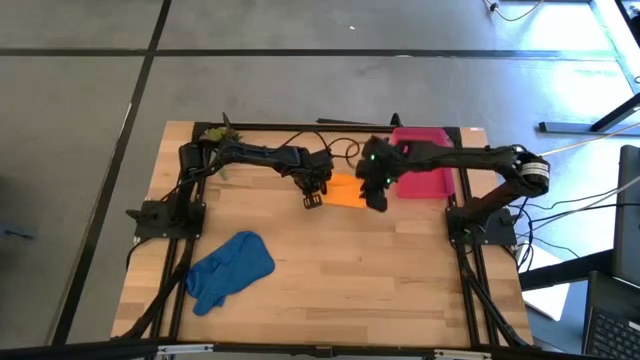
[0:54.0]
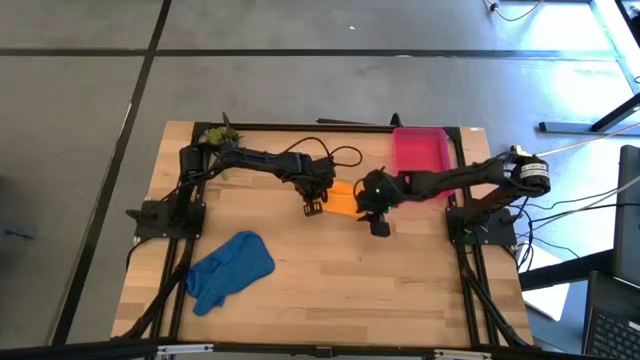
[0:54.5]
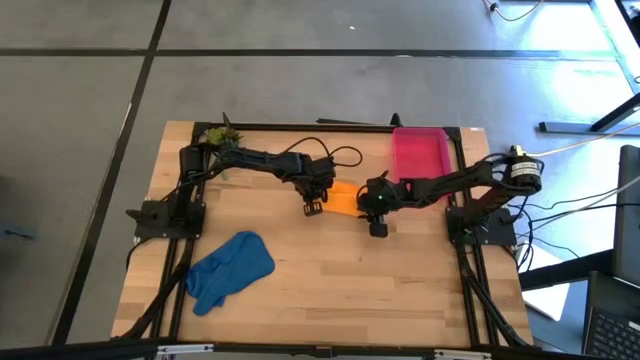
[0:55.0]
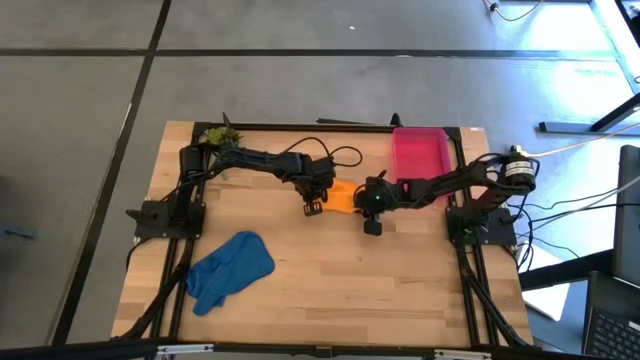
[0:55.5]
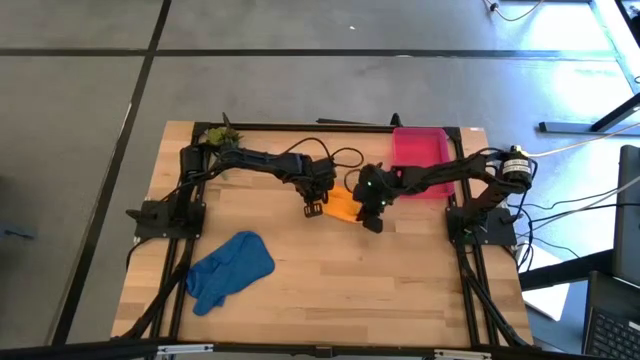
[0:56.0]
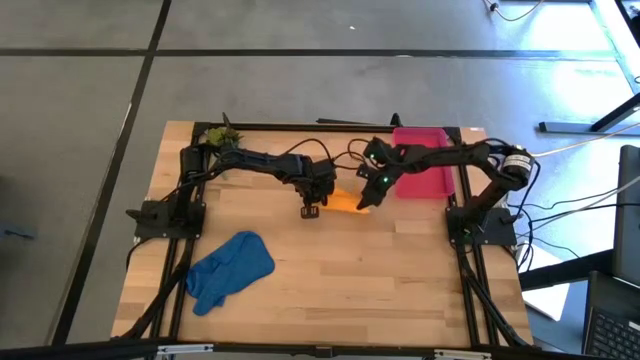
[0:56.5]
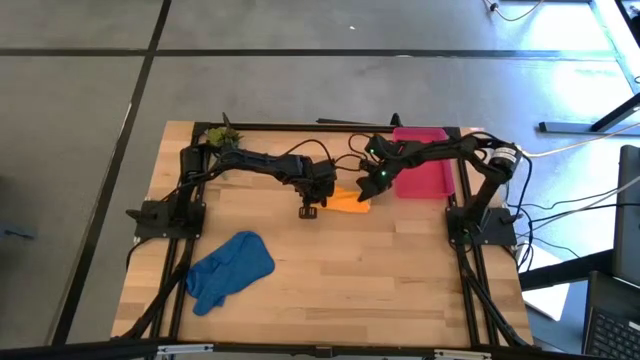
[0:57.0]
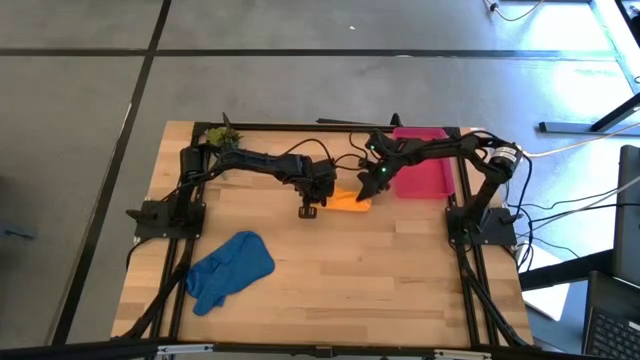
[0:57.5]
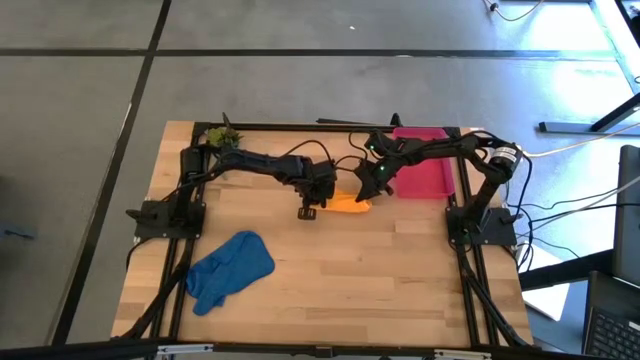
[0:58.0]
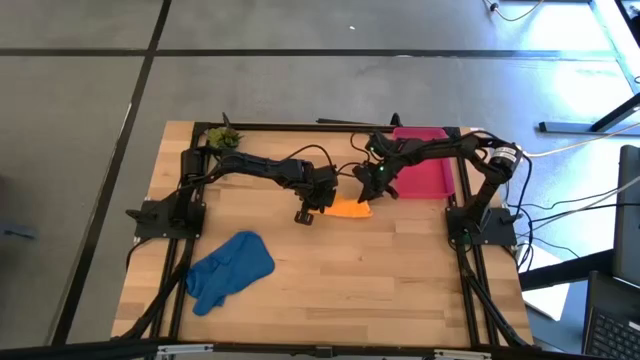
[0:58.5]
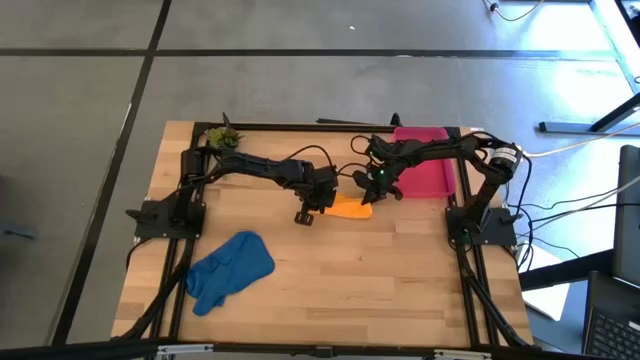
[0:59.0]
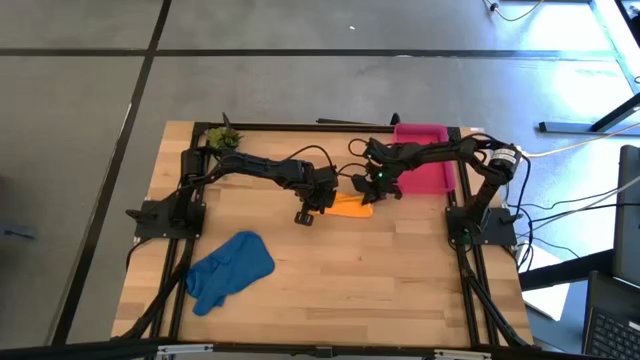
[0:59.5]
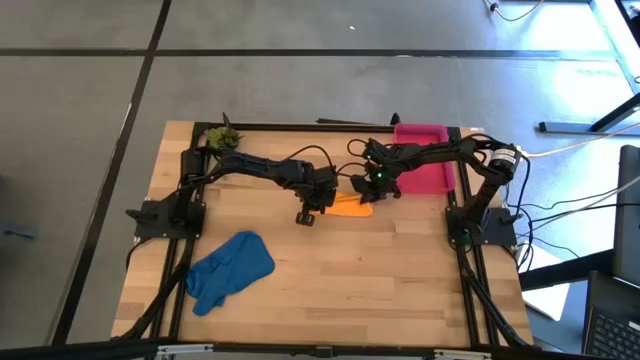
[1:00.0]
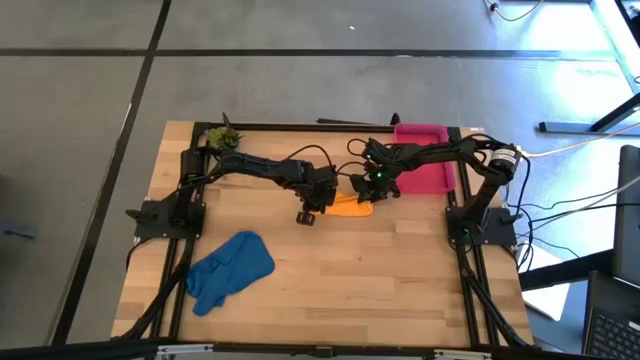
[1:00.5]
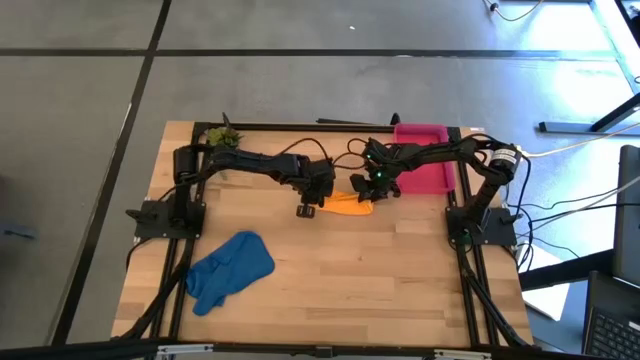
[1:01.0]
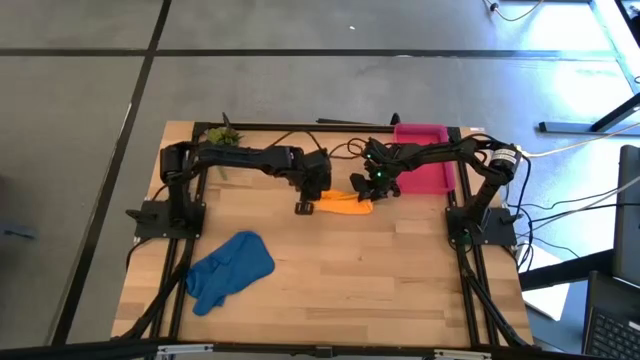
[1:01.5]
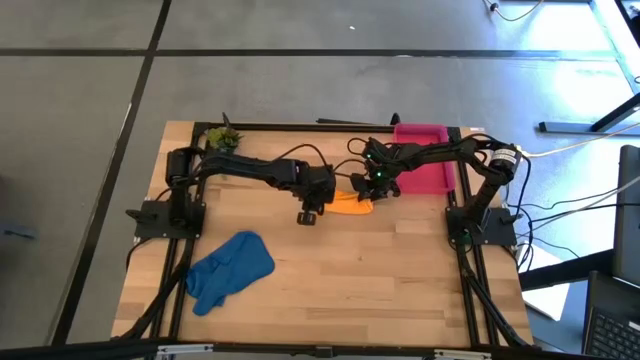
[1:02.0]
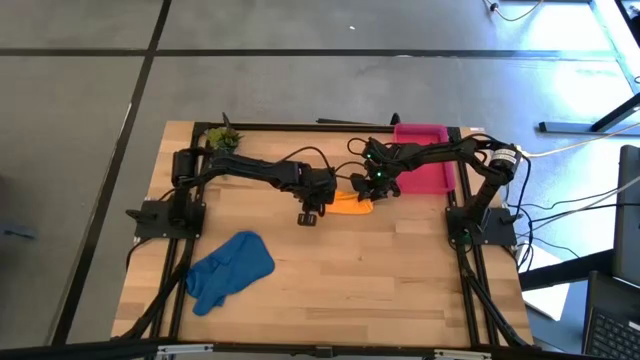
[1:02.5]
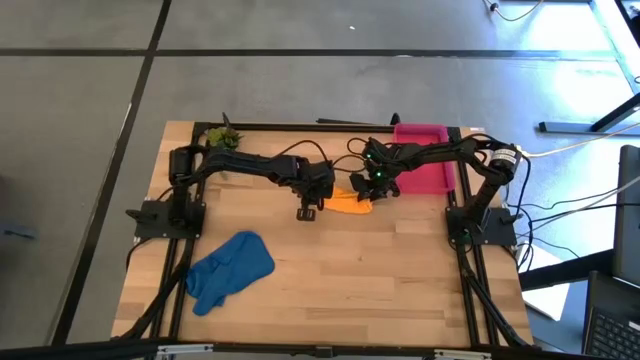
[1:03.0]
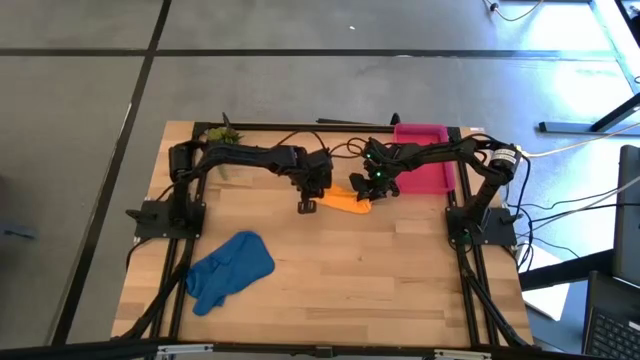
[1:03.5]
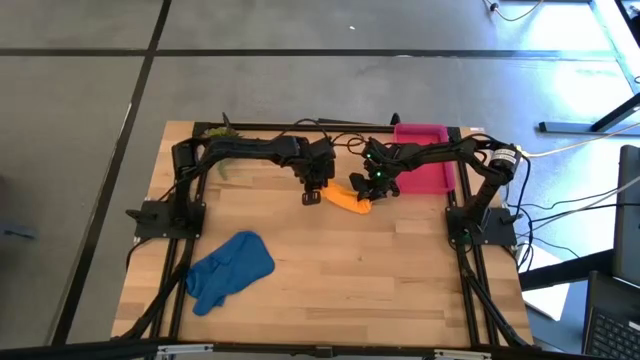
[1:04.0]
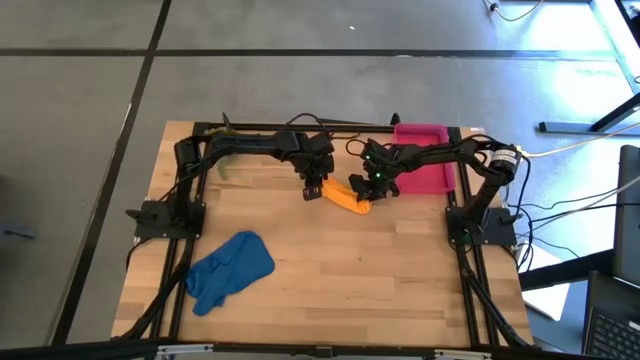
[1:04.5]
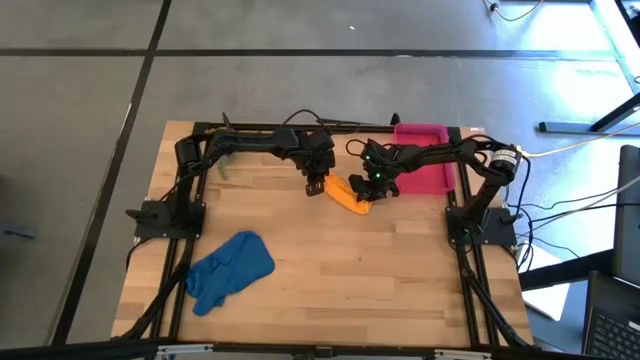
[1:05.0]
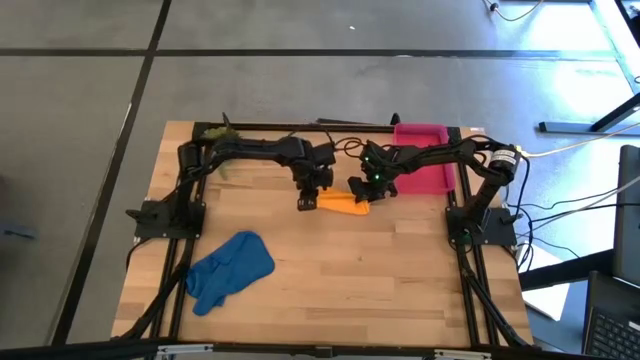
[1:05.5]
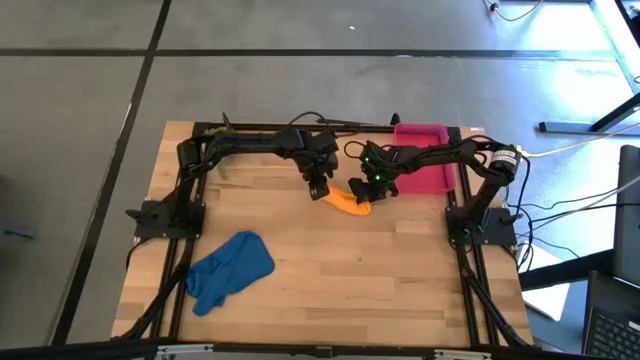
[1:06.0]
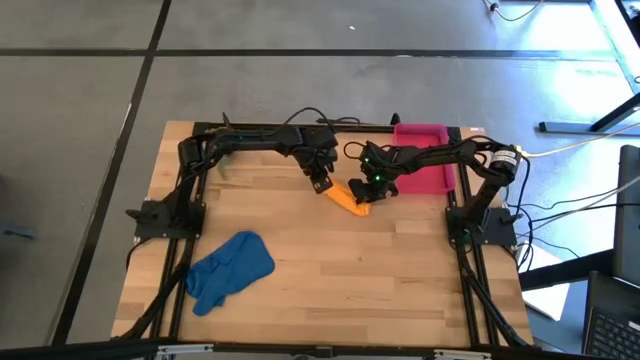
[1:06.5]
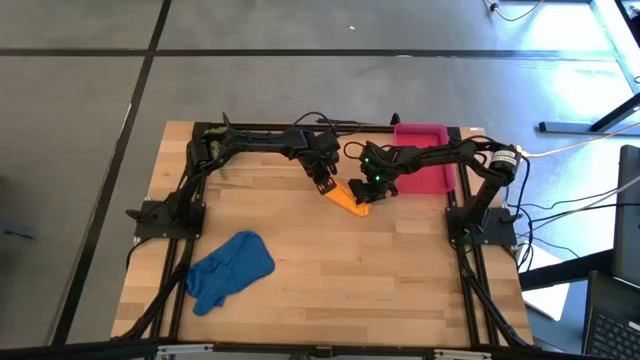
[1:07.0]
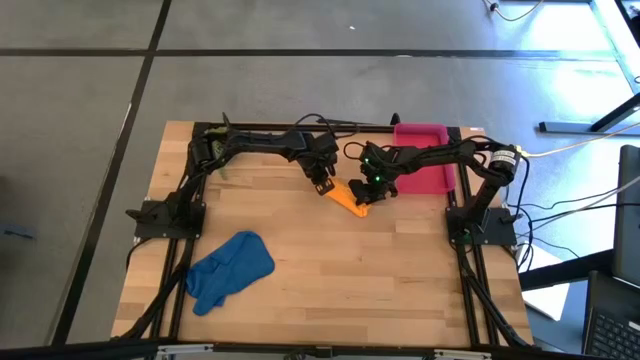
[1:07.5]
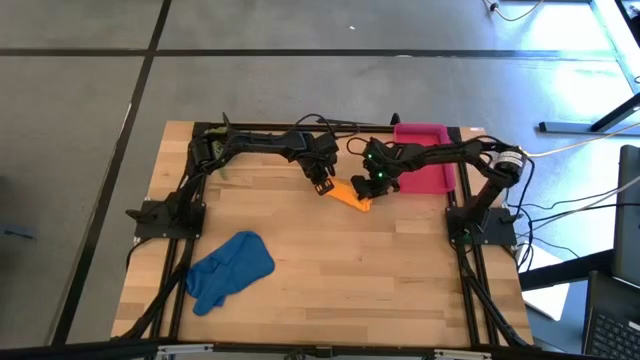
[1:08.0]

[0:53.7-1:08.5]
Task: Roll microfiber towels into tight, uniform cylinder then place into a basket
Roll the orange microfiber towel

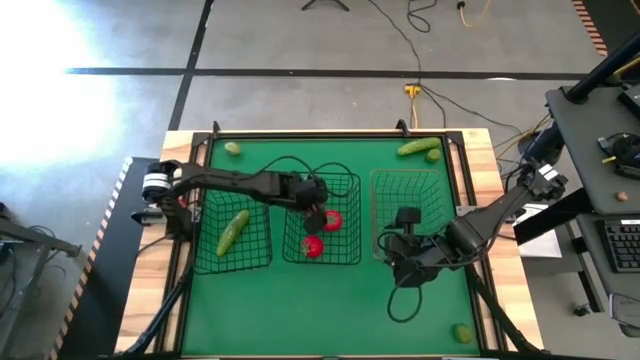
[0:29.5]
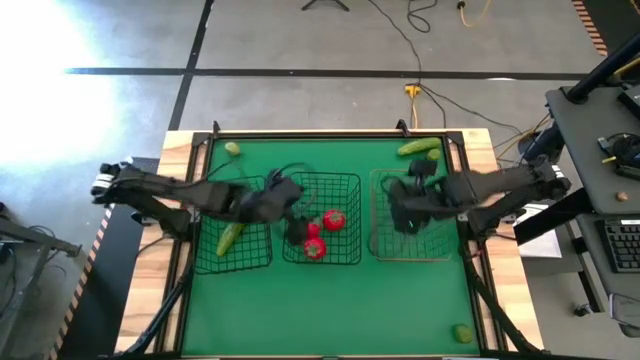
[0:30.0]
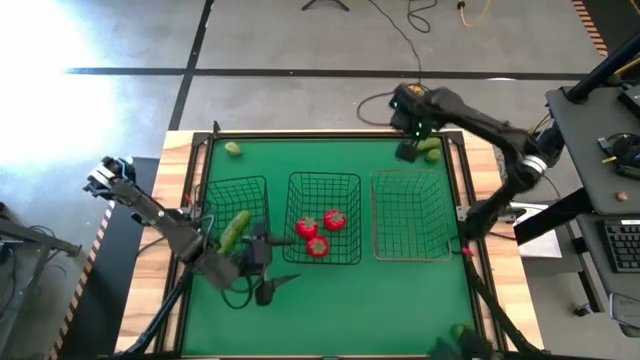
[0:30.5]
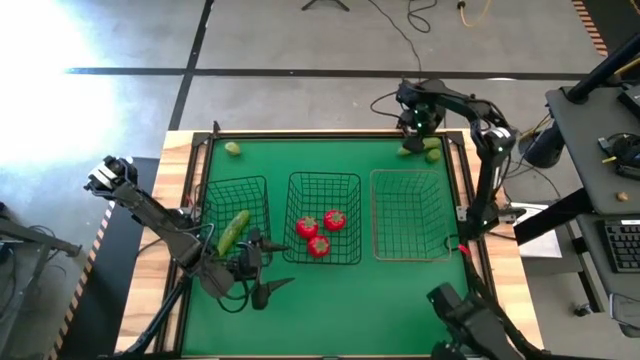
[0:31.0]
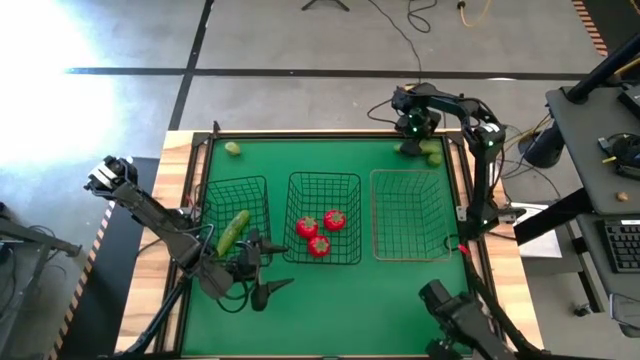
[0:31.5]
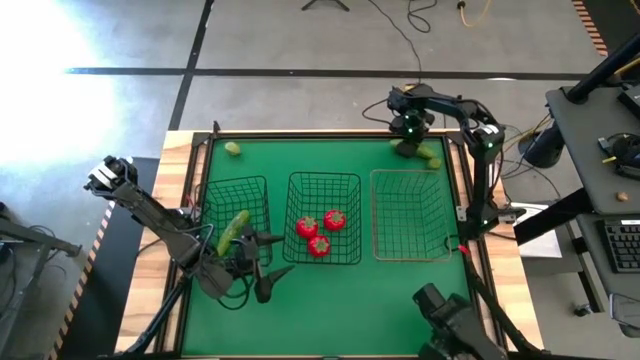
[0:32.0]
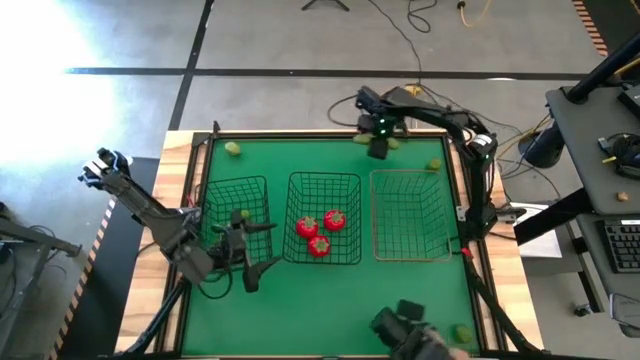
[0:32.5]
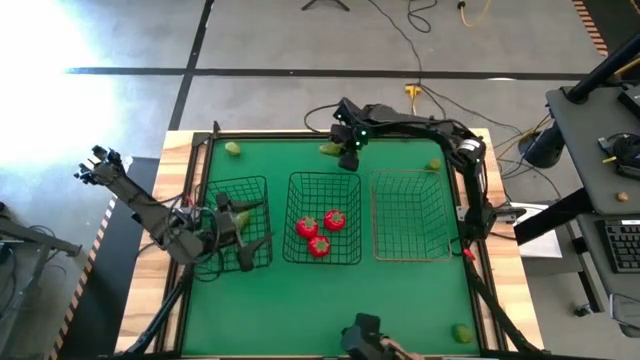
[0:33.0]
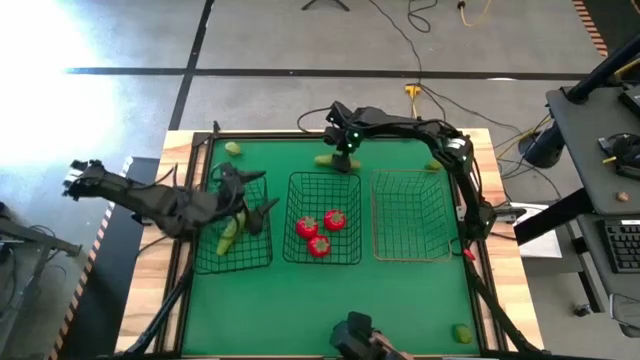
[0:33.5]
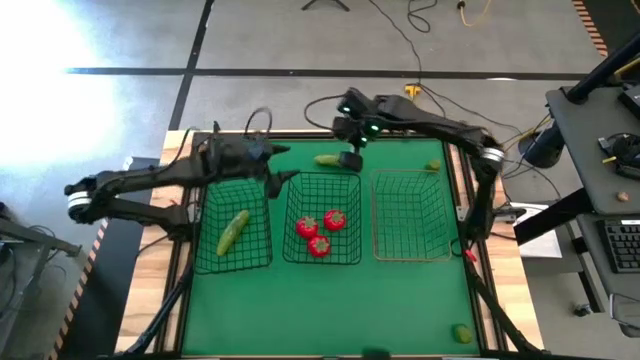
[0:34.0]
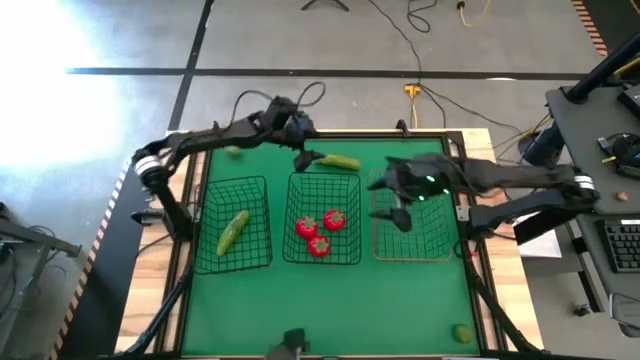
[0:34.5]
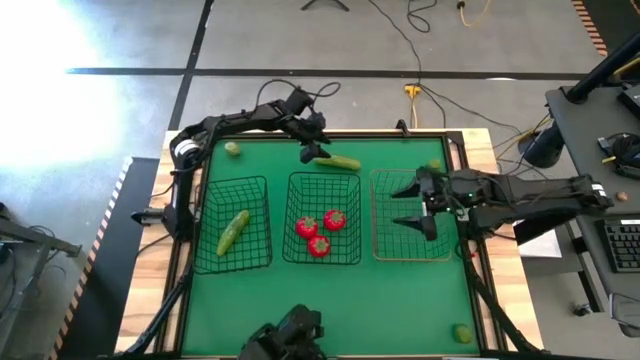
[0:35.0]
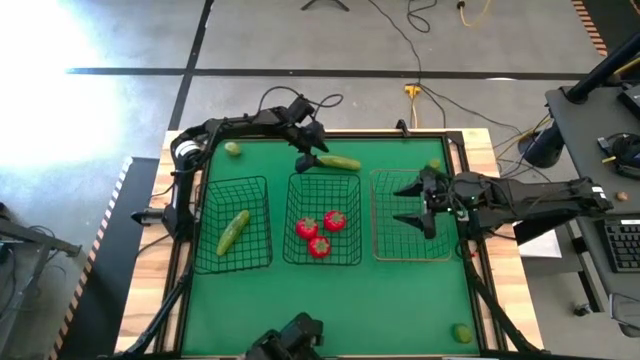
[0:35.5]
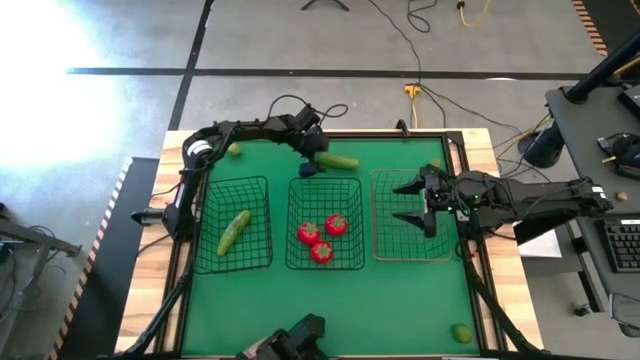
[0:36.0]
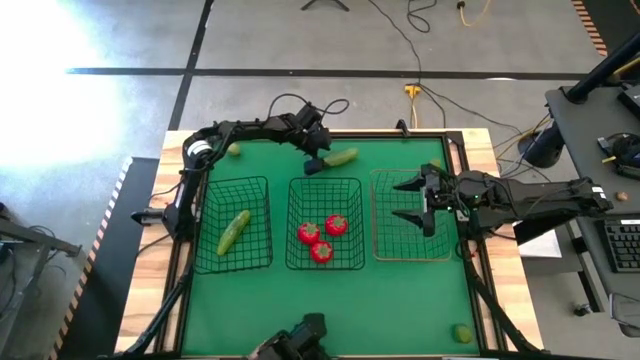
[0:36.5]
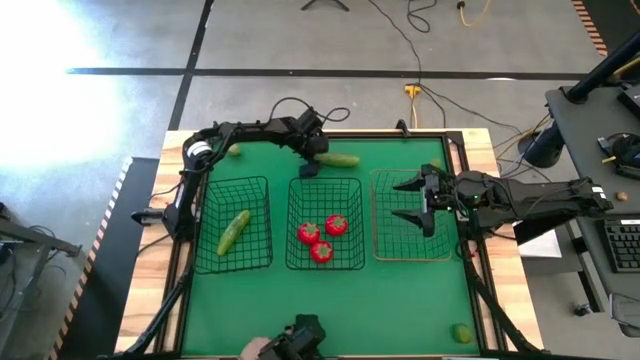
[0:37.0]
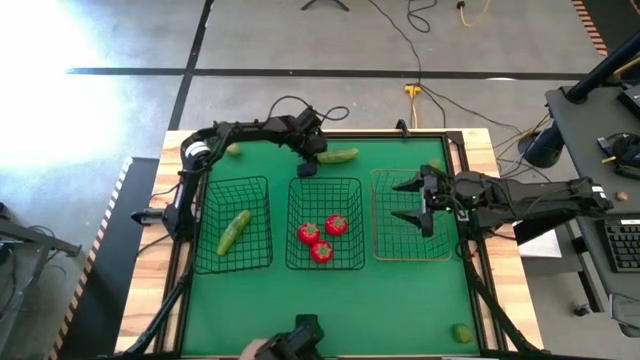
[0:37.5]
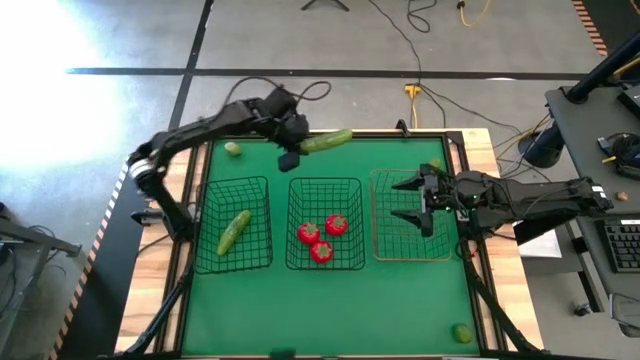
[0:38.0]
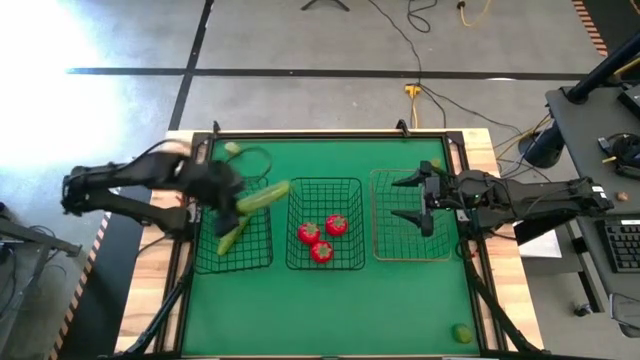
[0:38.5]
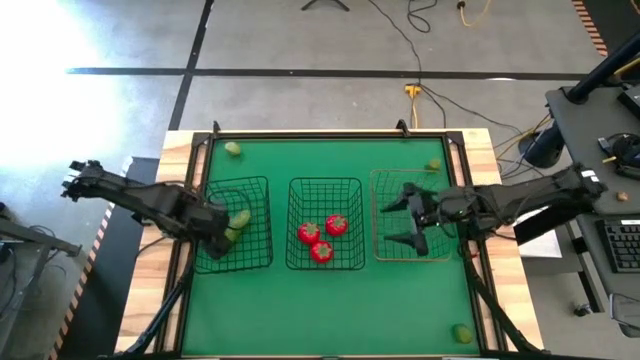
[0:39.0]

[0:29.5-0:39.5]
Task: Sort produce into baskets
Put the cucumber into the left black wire basket
